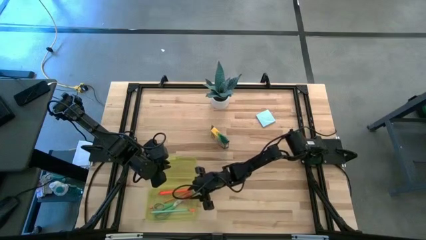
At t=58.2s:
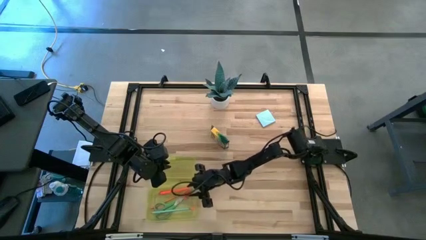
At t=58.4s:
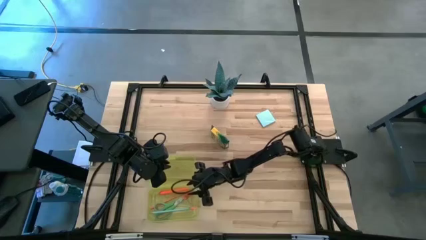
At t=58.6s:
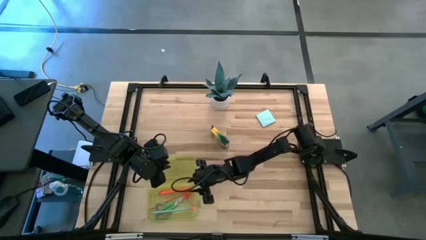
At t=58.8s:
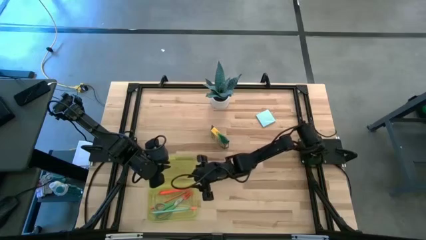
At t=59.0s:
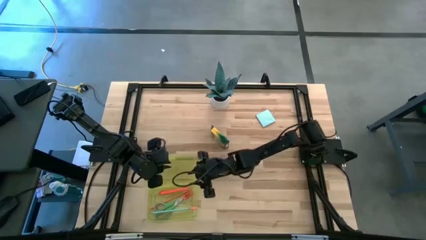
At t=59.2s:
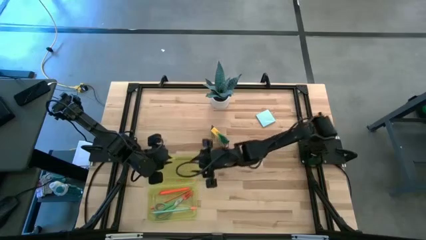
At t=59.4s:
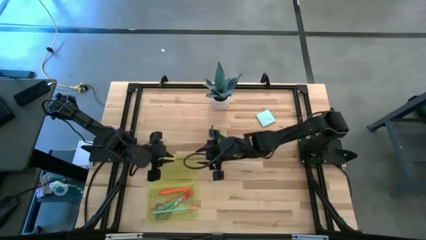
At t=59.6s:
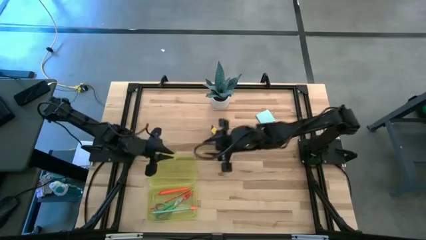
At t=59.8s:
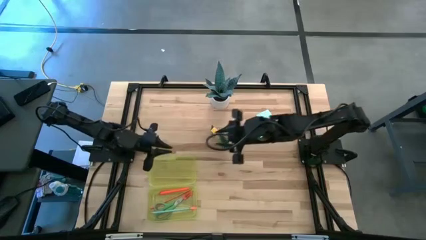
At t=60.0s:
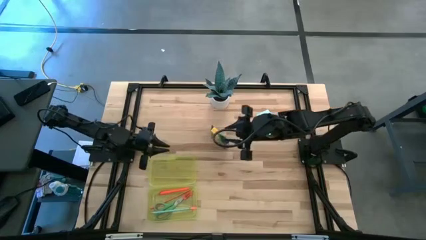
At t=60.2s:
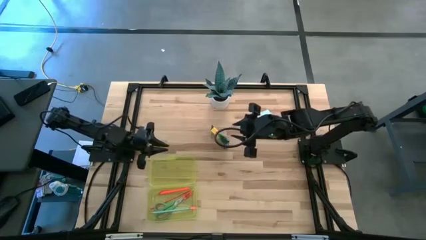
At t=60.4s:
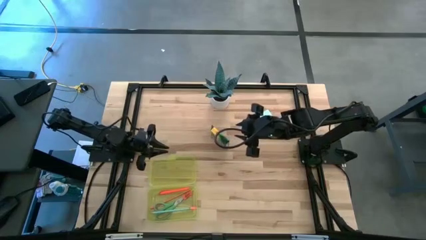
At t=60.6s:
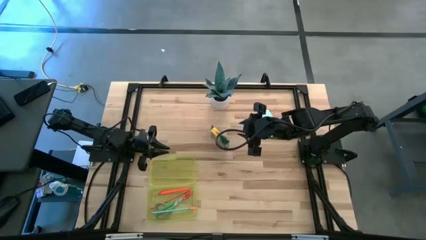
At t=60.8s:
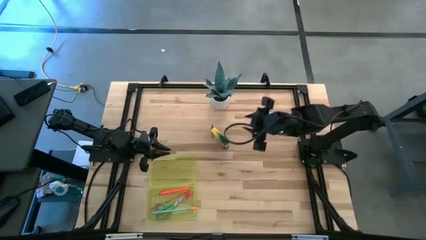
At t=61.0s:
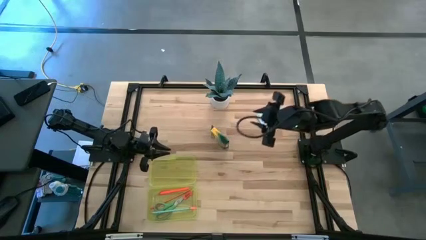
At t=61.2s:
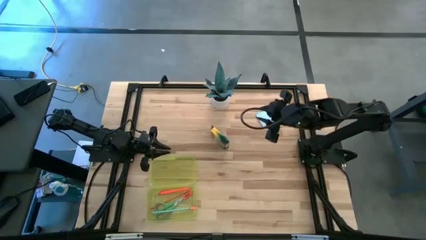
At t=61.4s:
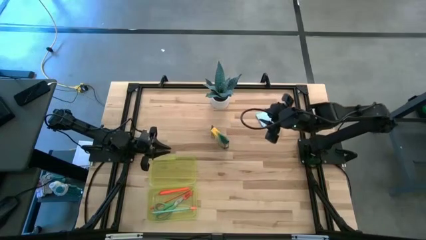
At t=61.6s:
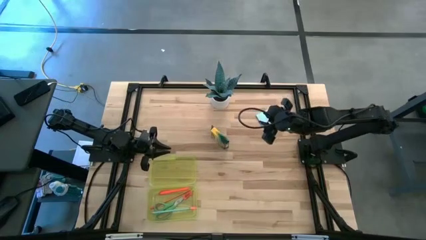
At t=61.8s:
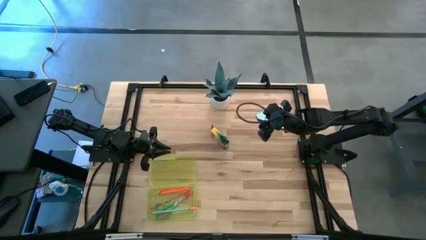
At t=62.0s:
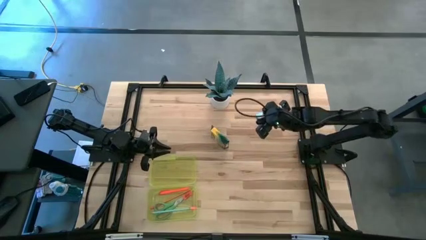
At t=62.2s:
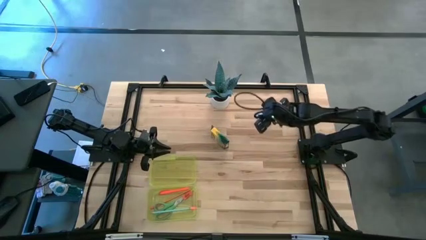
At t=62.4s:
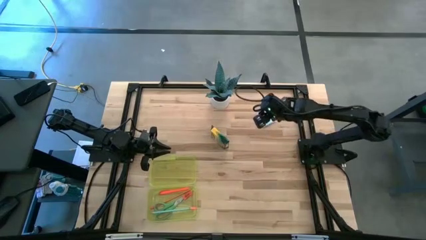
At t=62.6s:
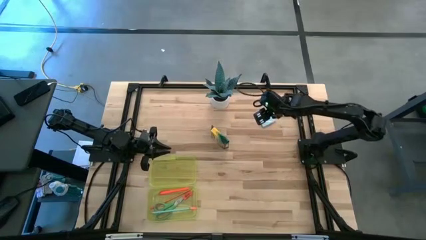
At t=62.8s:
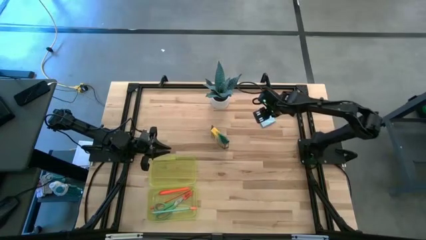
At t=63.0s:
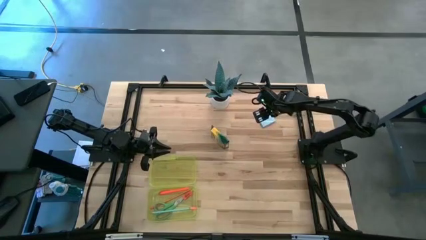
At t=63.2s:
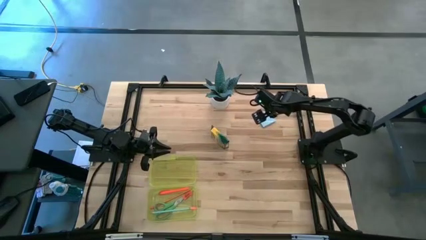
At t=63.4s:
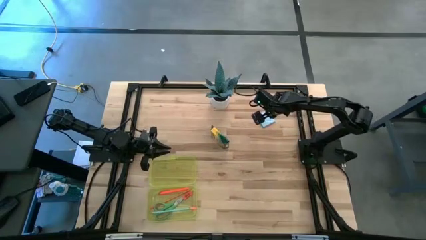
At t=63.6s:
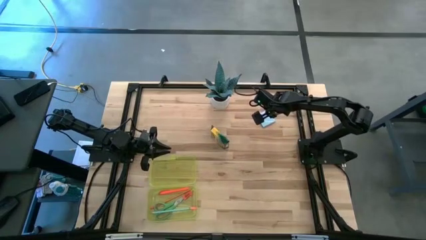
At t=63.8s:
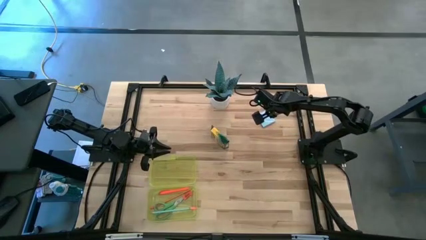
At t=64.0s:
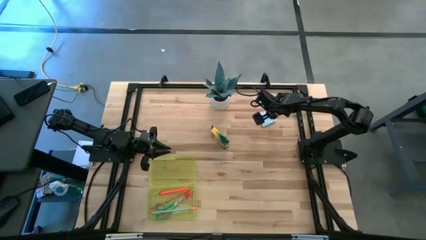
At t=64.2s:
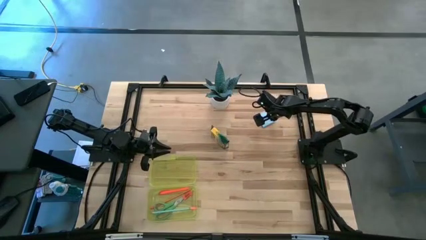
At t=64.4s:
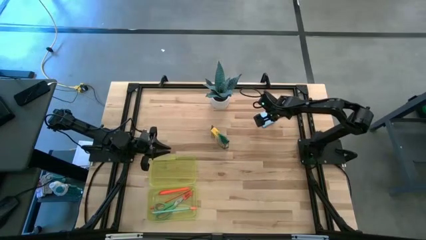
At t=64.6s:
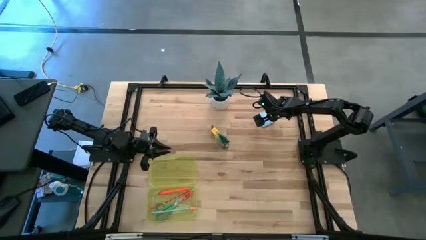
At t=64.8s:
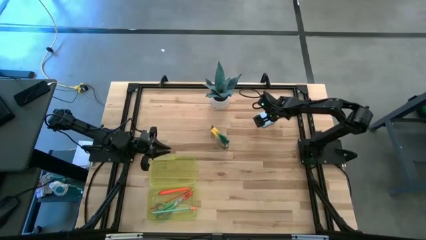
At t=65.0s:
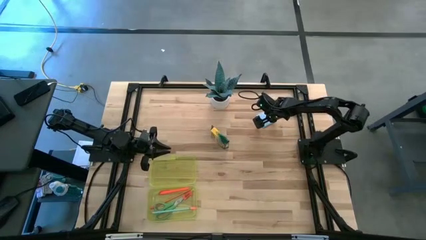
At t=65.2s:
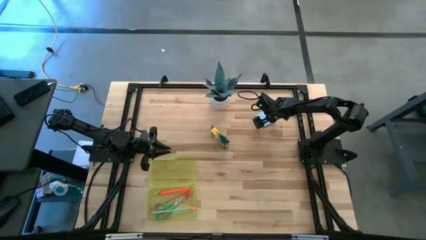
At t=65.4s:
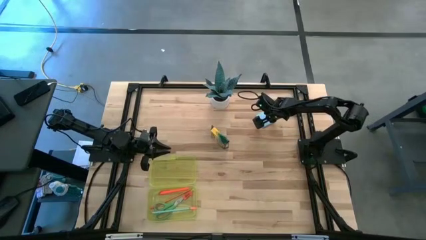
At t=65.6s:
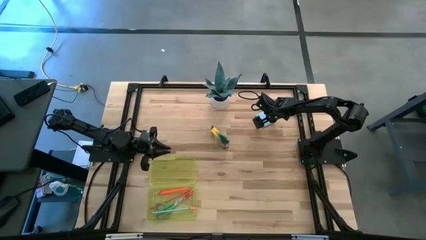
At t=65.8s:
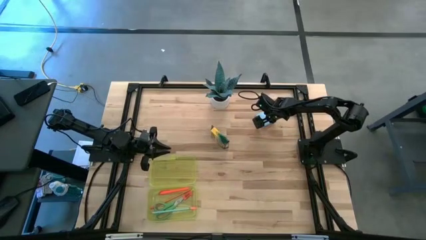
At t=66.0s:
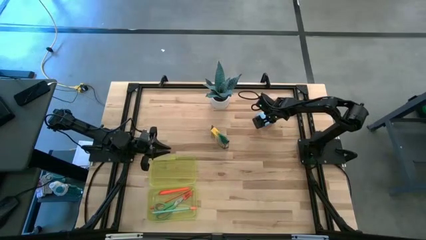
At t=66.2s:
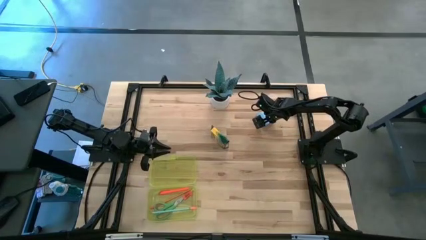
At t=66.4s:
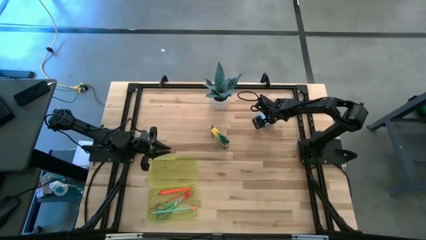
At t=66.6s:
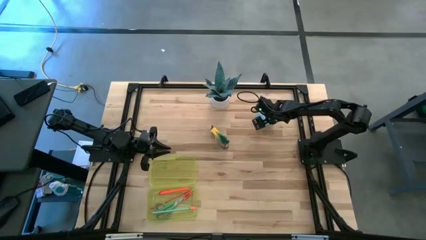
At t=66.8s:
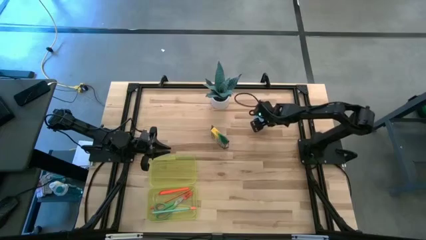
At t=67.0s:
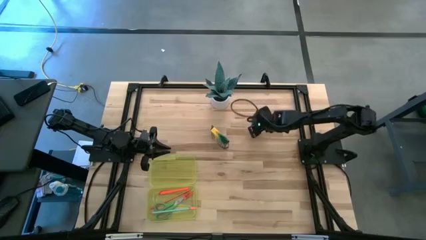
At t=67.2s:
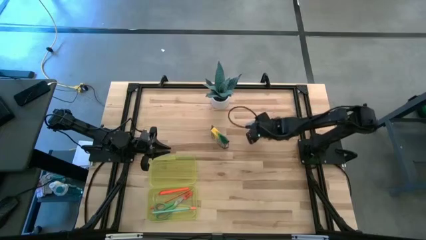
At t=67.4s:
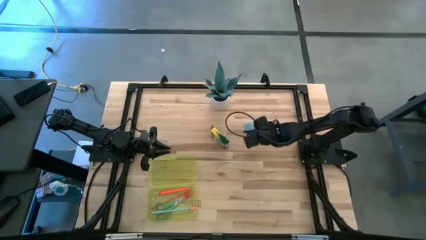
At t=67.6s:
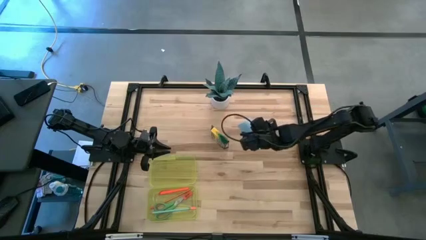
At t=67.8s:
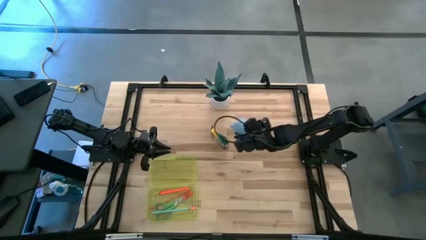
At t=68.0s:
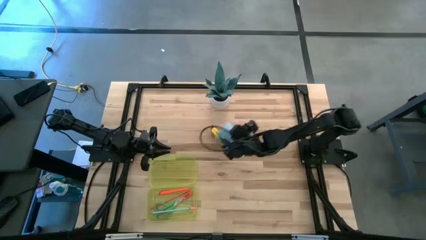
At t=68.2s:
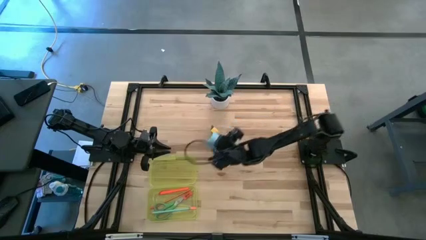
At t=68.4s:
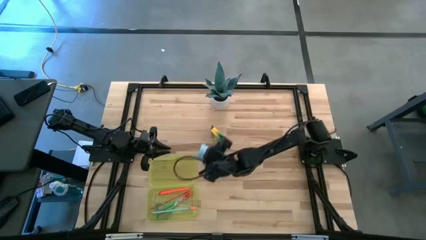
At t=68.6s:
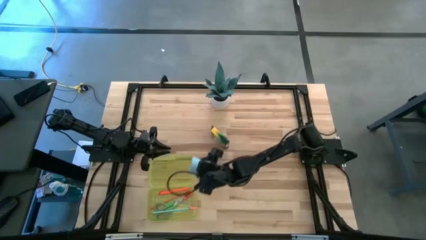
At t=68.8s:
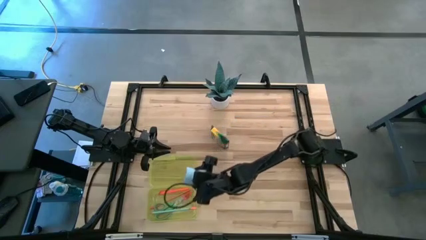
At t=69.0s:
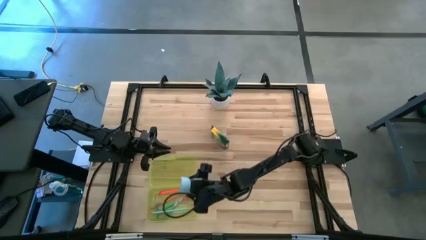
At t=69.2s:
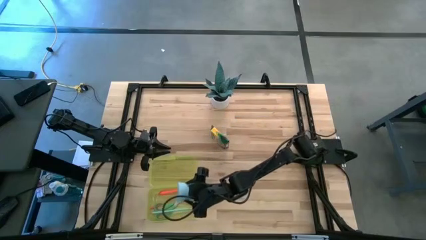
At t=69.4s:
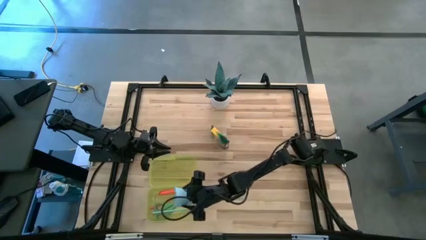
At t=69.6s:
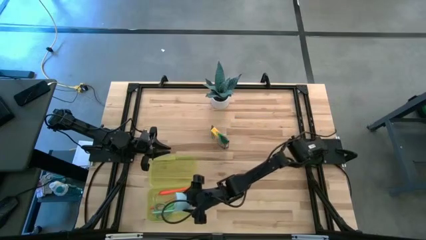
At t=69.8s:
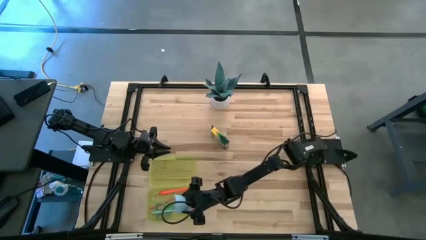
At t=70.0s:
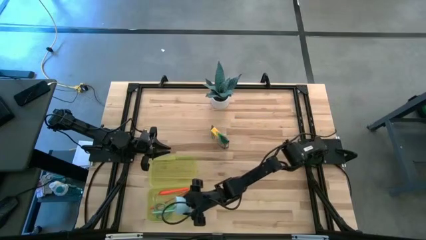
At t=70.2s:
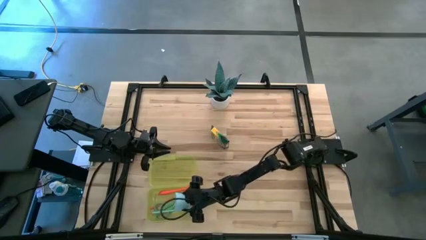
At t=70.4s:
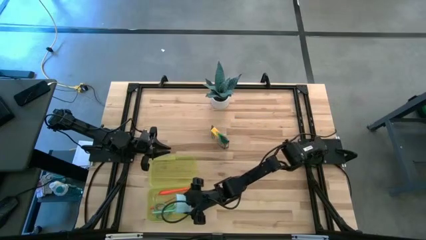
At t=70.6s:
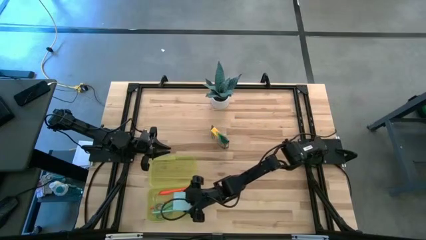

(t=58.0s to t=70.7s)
Task: Pack school essentials
Put the blue sticky notes pad into the yellow supply box

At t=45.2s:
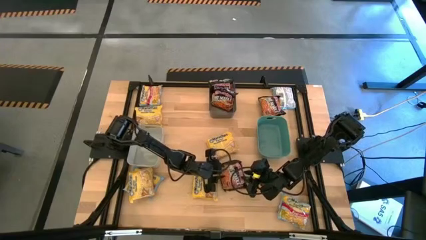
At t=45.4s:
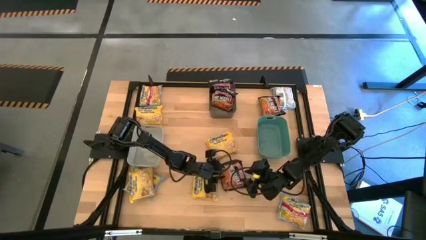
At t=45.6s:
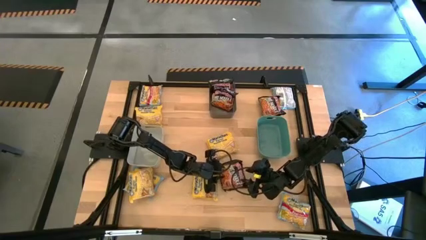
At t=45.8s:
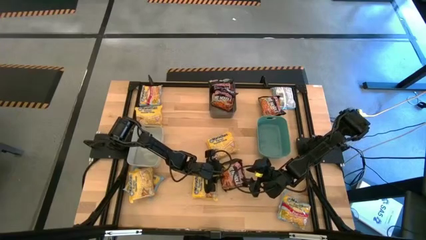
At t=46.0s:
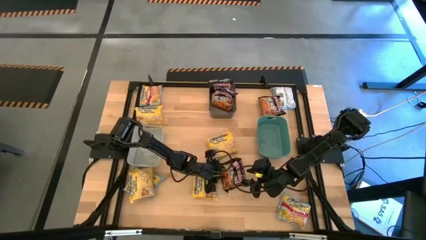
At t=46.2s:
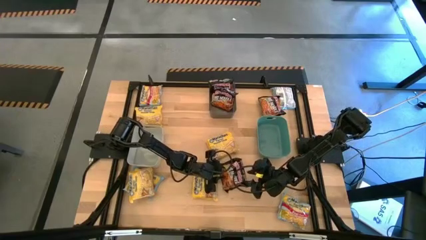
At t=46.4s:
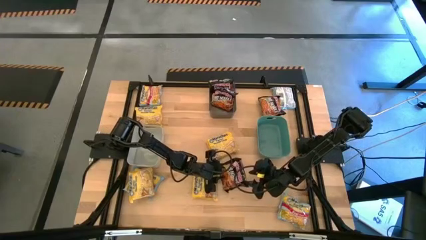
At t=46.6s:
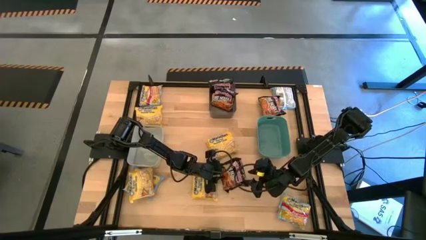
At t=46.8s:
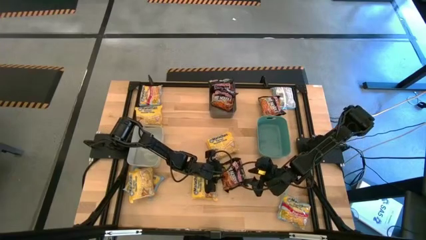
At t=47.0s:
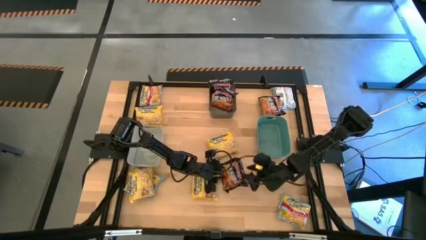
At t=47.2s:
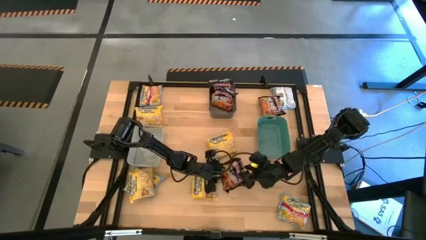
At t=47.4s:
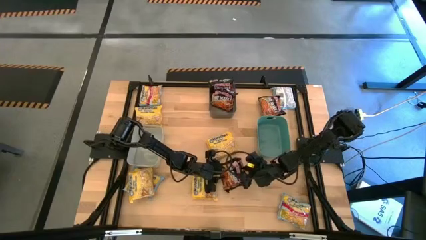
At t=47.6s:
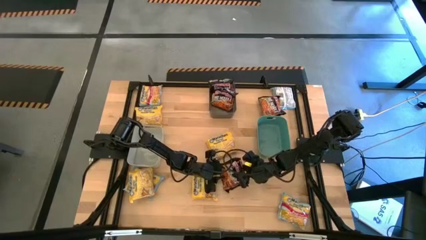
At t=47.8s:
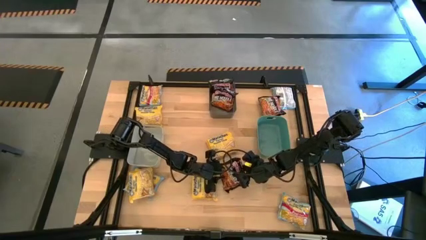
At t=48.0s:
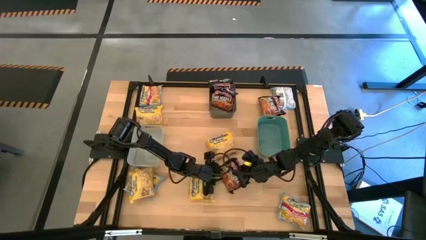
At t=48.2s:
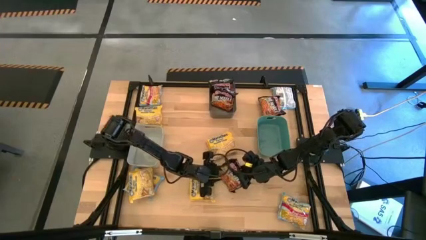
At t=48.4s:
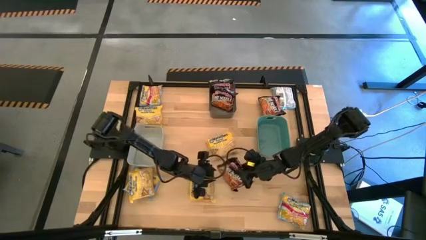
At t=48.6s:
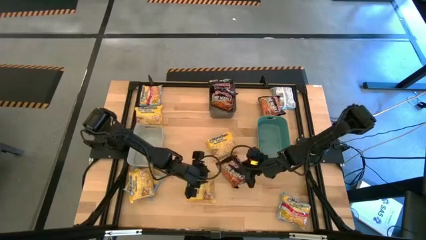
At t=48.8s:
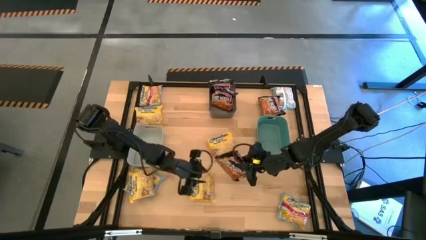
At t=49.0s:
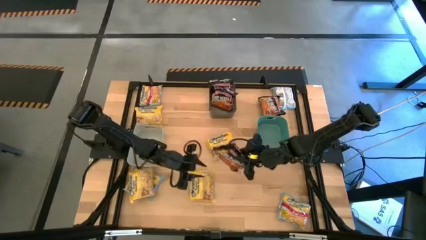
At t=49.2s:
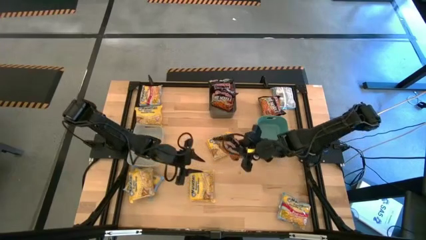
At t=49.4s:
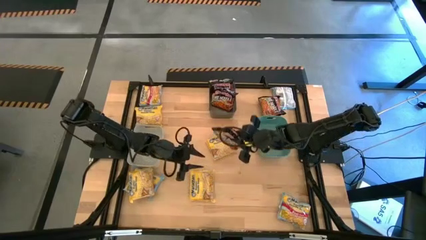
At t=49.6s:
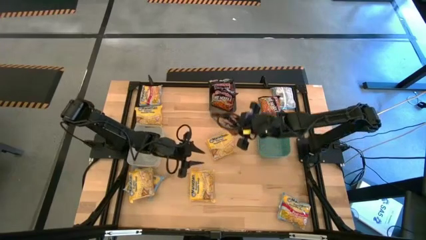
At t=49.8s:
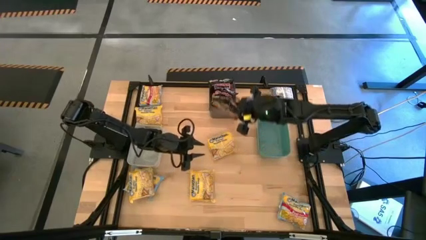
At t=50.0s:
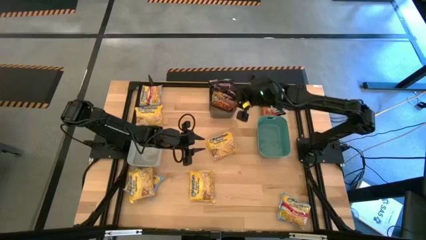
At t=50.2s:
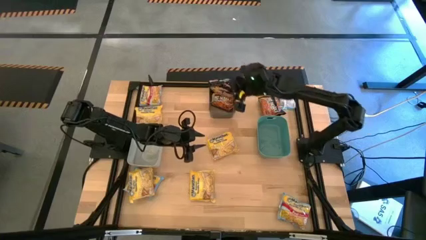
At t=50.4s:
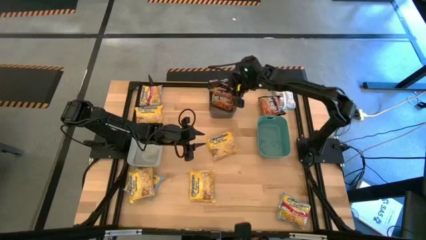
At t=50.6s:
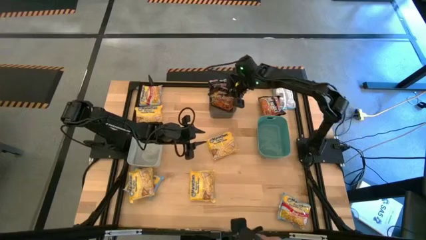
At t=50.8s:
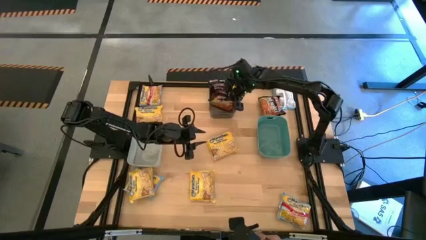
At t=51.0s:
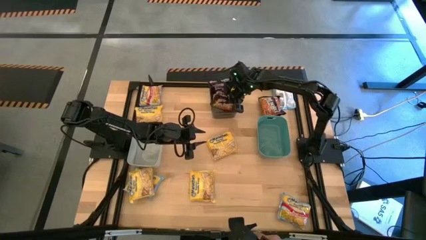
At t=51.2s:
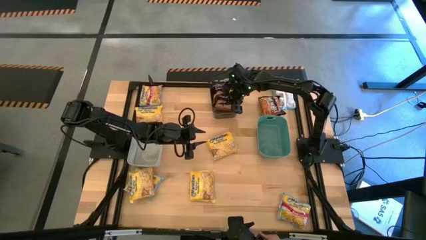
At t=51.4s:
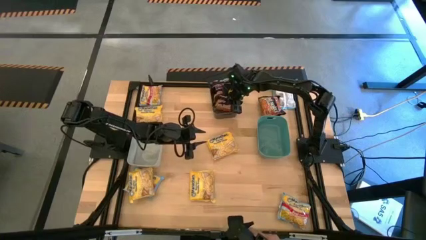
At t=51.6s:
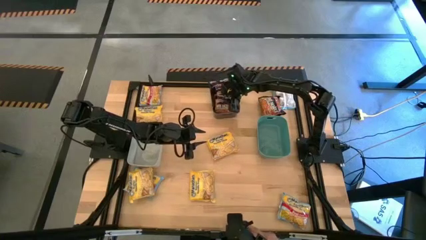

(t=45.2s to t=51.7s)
Task: Sort Maruchan noodles
Put the black noodle pack into the black bin
